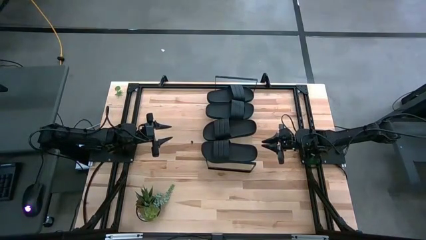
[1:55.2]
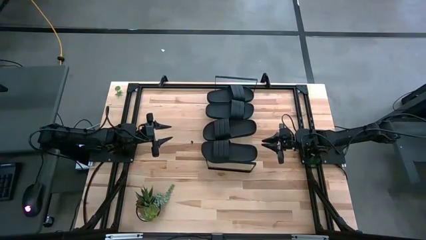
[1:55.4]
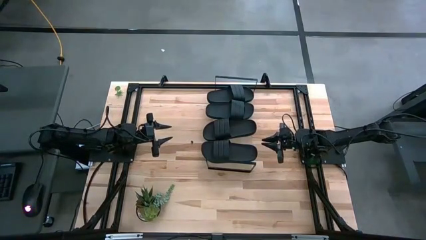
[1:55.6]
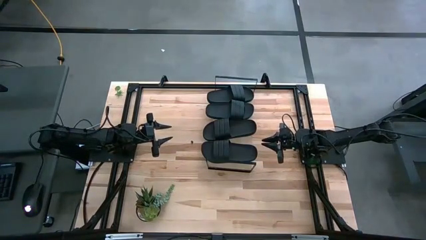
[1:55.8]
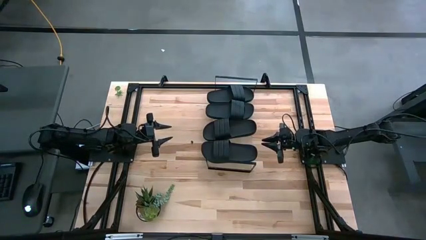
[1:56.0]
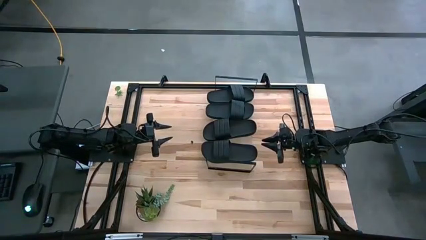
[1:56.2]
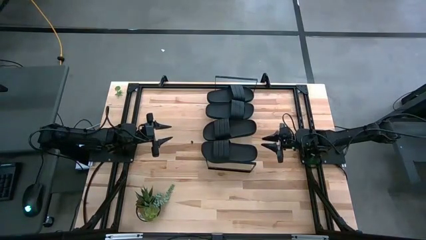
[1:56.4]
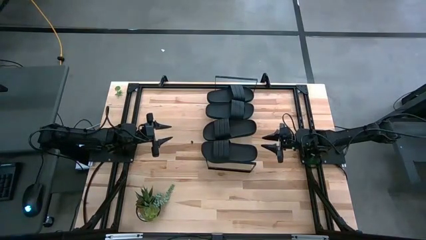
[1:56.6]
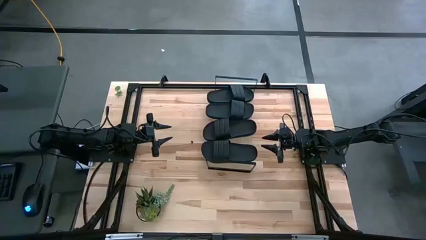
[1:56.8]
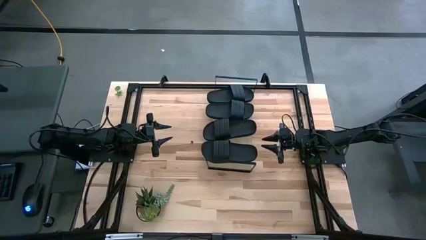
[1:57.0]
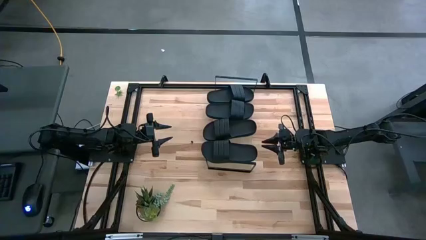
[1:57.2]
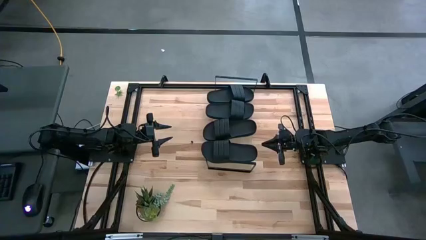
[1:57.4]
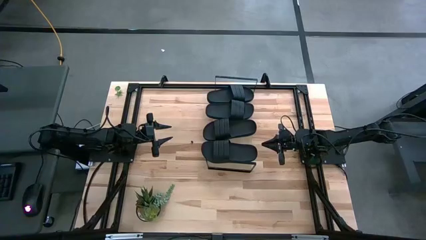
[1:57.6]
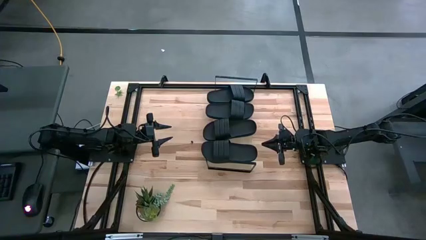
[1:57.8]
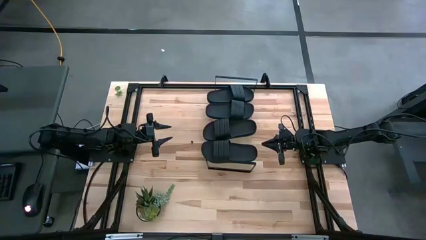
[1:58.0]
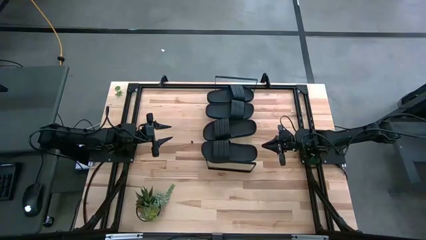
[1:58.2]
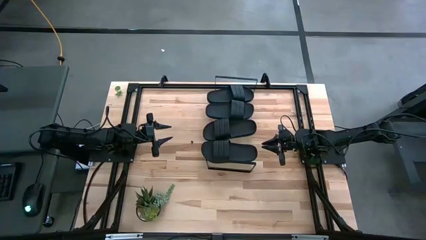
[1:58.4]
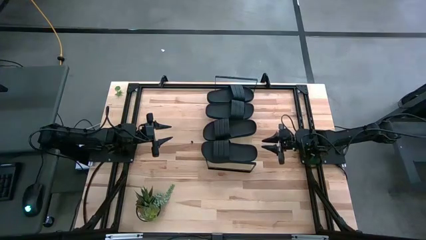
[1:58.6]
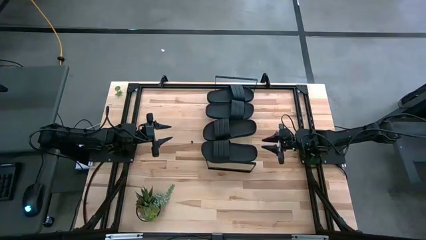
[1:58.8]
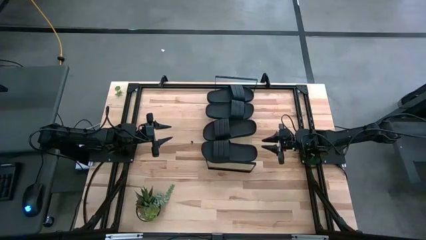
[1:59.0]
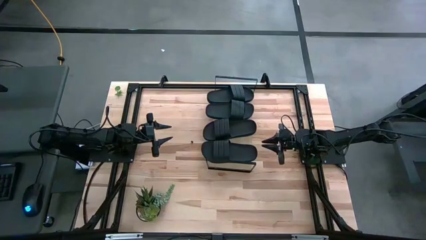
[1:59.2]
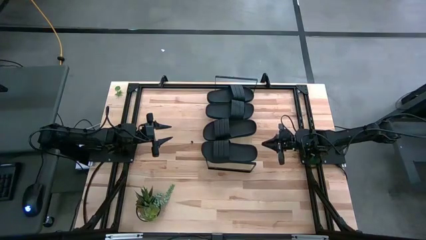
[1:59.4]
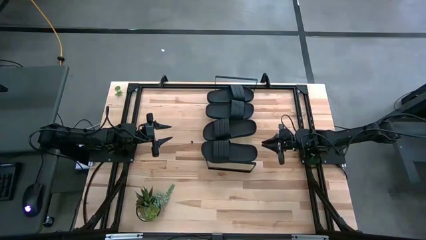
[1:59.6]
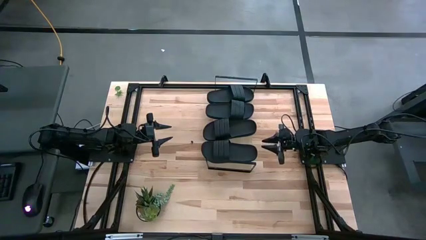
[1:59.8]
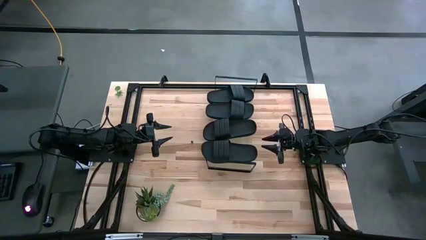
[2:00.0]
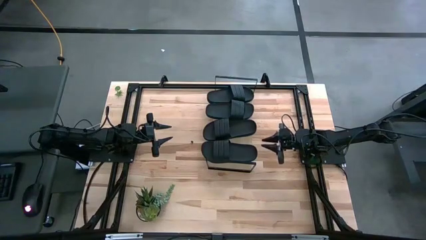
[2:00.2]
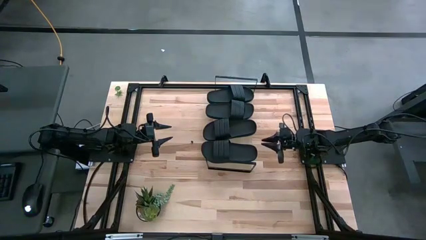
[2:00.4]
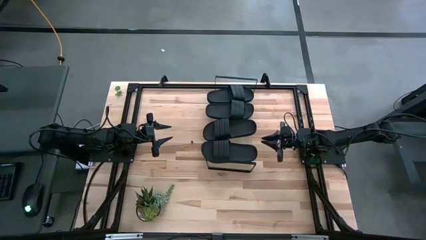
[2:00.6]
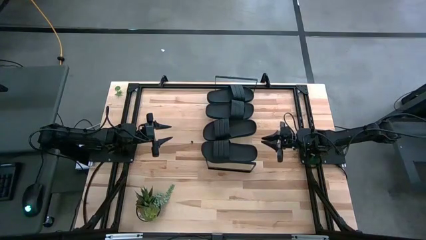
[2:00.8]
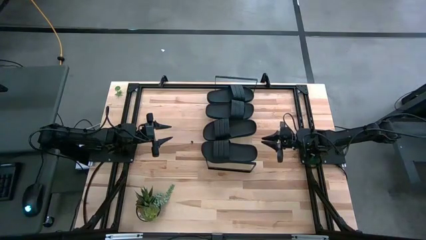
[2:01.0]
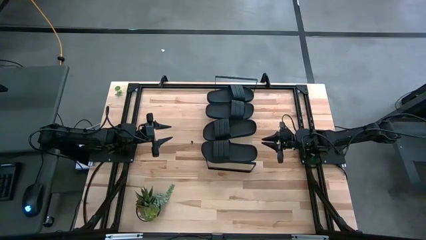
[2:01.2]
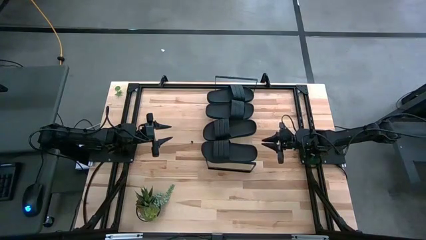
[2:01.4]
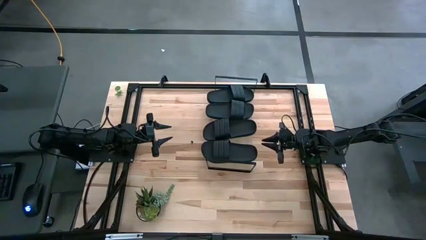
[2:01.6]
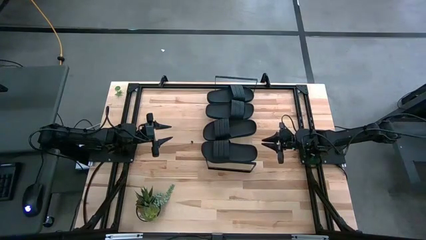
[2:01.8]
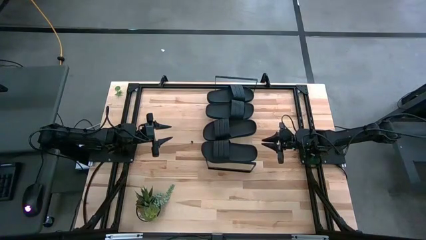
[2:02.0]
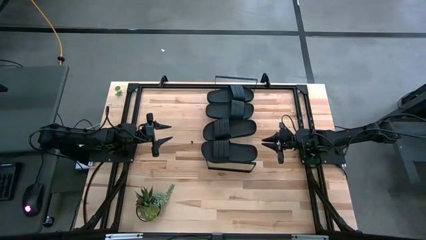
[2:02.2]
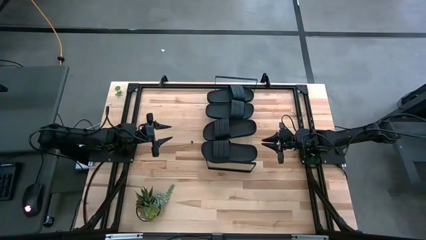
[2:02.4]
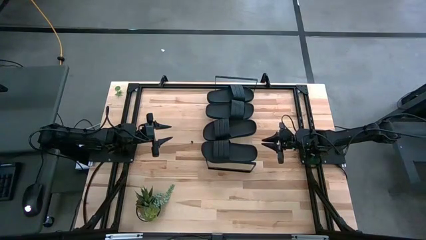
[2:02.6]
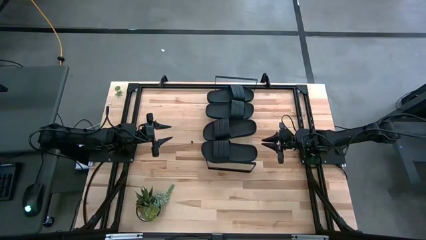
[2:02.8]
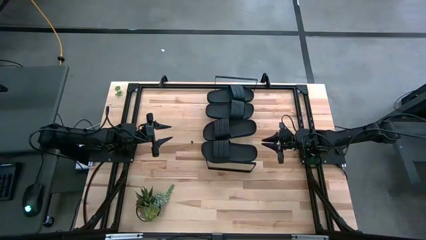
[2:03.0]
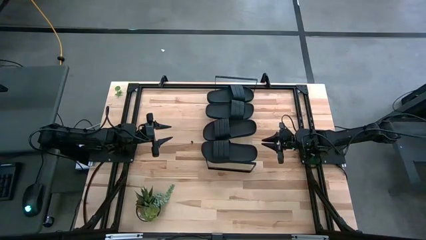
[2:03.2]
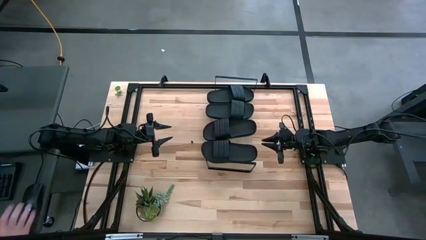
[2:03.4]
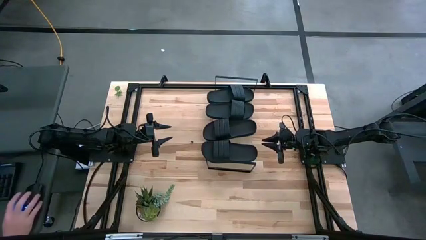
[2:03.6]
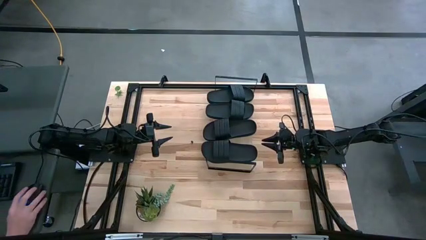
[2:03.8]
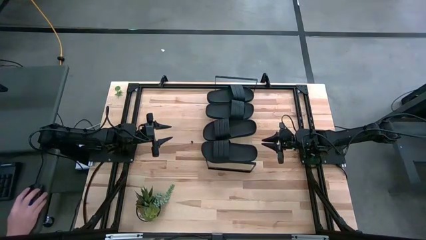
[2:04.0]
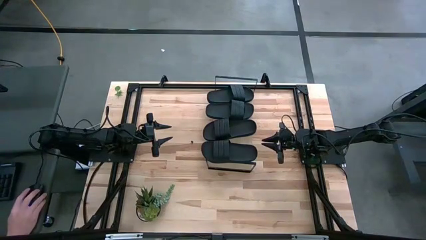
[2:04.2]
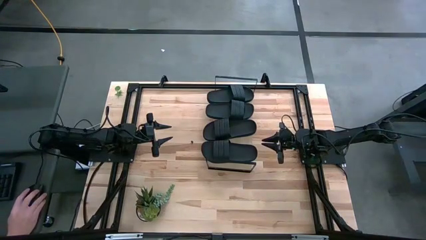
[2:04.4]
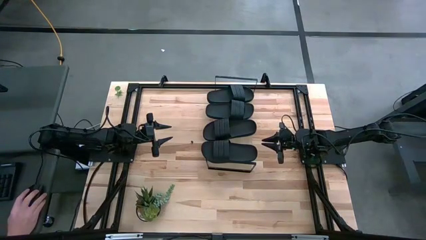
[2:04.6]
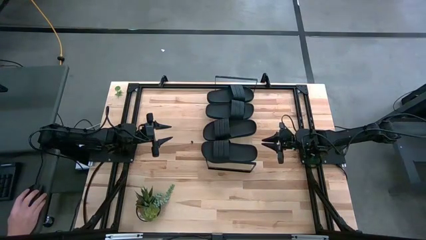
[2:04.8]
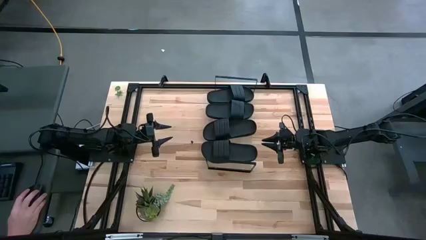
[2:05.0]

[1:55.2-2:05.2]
Task: Pick and place slides into the shelf
Return to Home Position

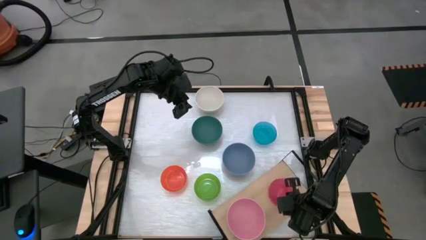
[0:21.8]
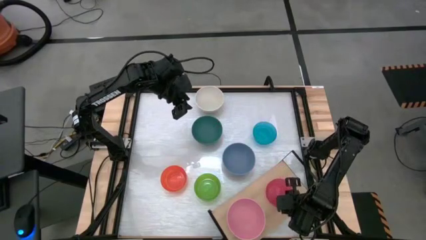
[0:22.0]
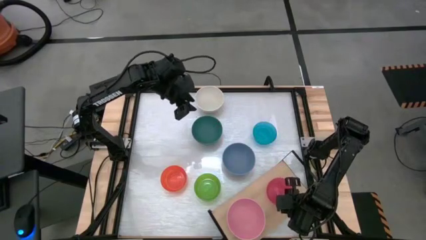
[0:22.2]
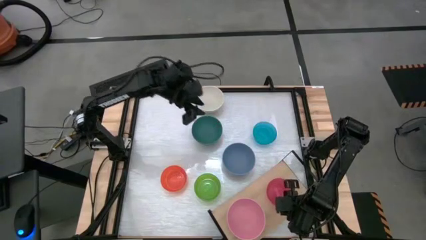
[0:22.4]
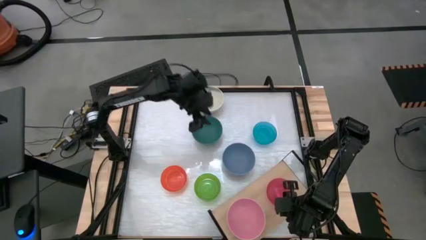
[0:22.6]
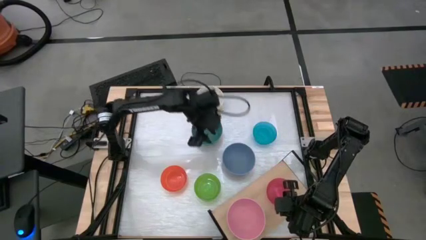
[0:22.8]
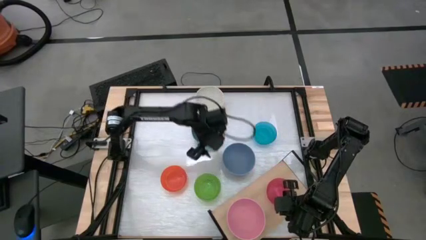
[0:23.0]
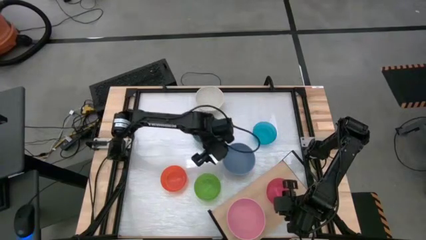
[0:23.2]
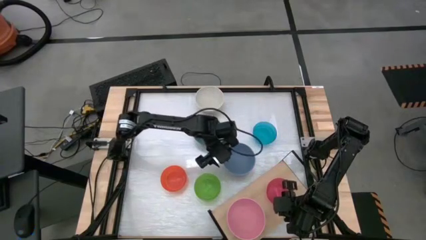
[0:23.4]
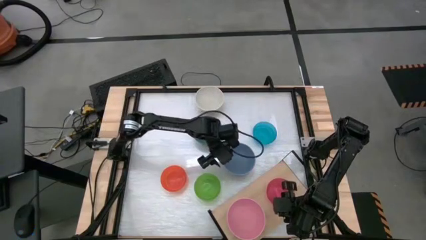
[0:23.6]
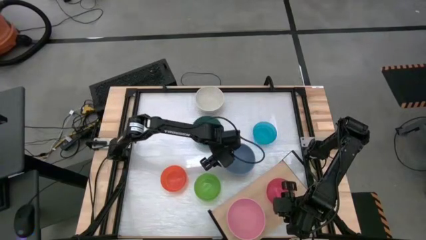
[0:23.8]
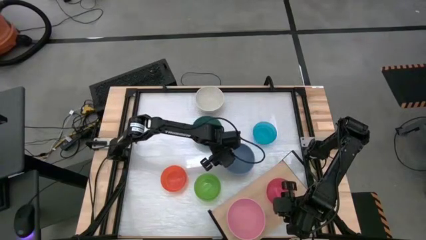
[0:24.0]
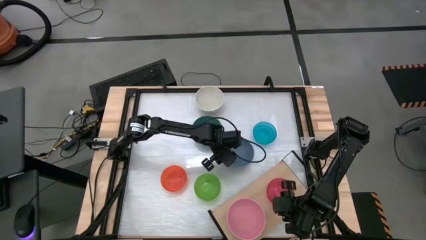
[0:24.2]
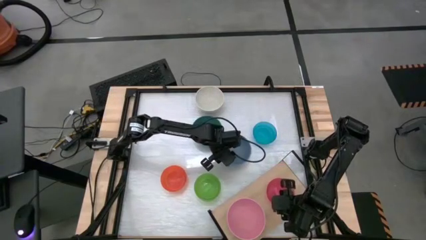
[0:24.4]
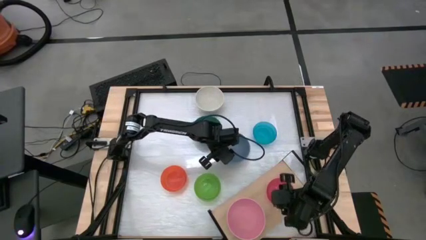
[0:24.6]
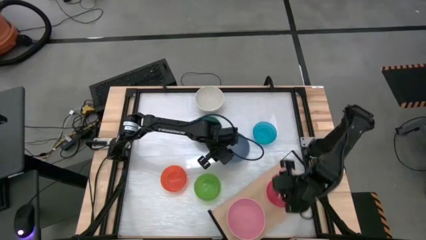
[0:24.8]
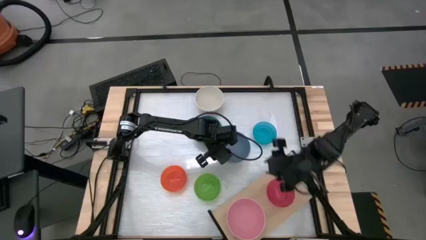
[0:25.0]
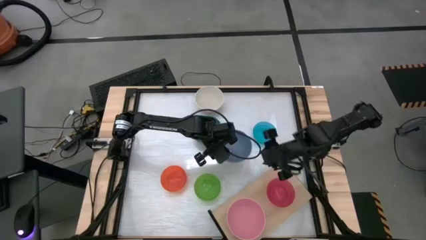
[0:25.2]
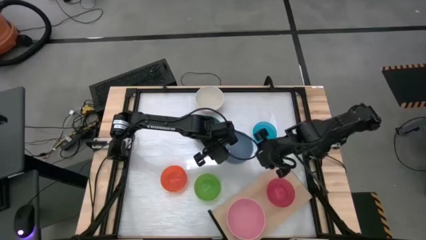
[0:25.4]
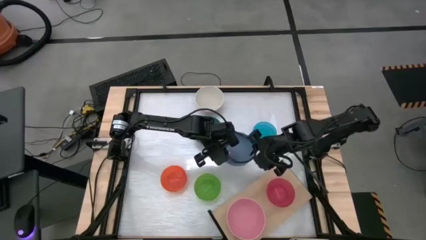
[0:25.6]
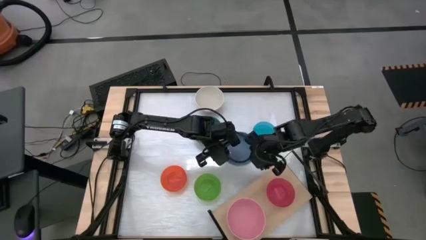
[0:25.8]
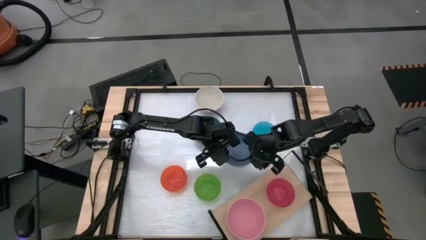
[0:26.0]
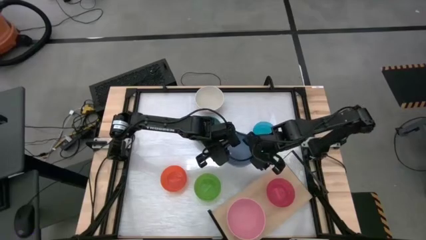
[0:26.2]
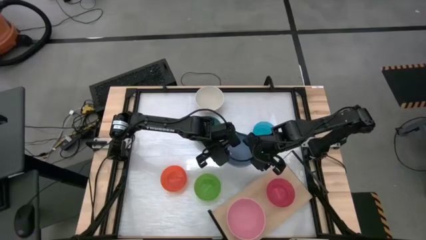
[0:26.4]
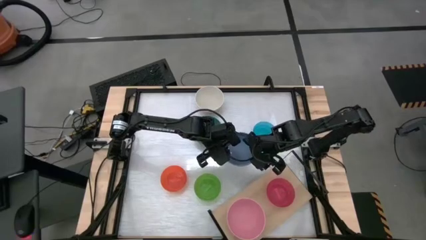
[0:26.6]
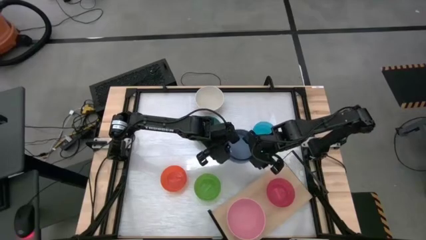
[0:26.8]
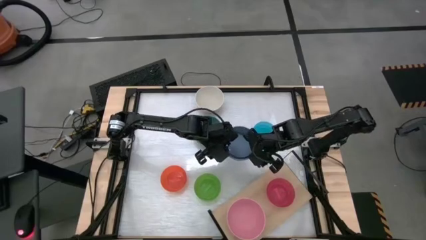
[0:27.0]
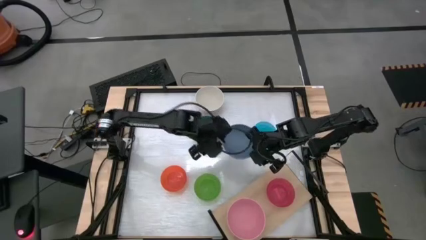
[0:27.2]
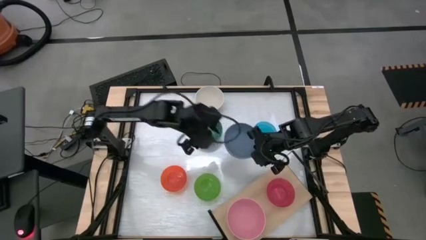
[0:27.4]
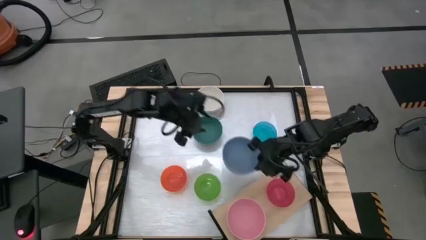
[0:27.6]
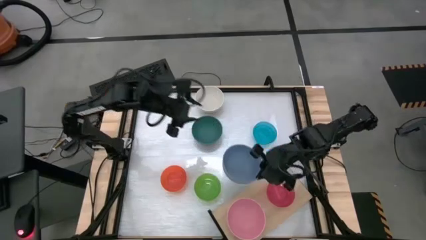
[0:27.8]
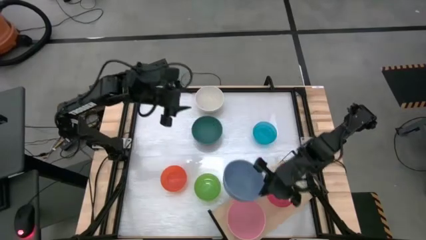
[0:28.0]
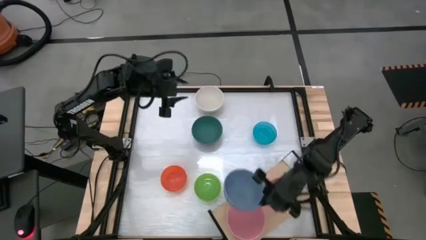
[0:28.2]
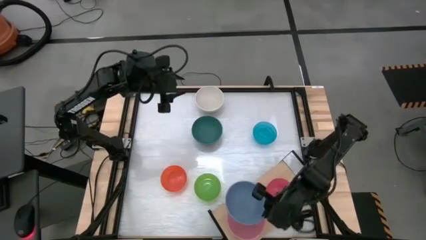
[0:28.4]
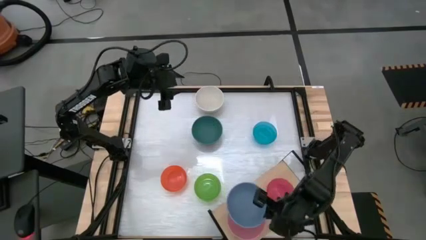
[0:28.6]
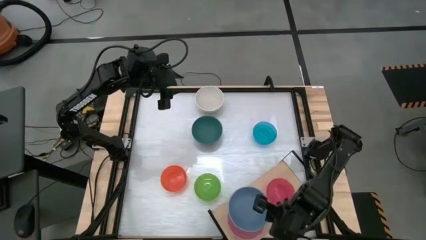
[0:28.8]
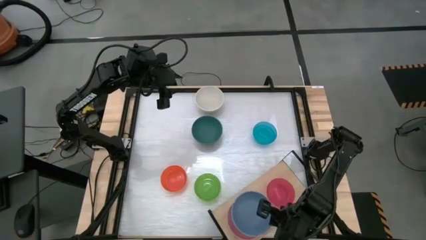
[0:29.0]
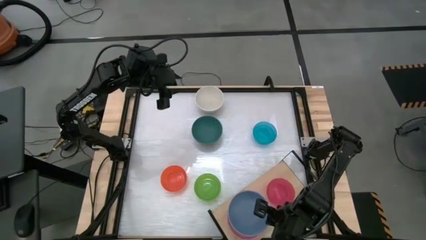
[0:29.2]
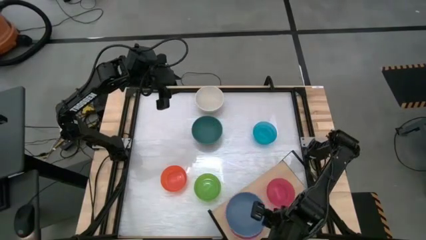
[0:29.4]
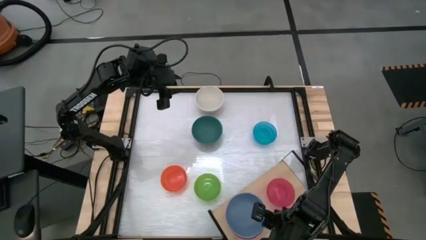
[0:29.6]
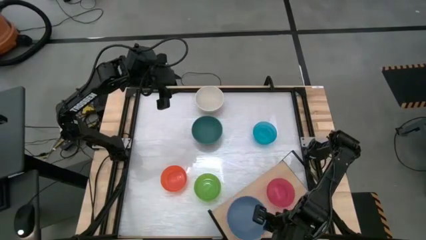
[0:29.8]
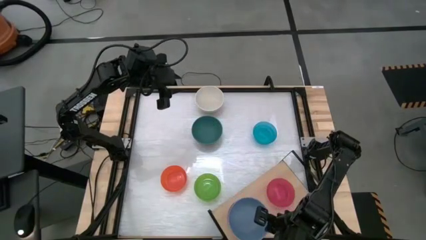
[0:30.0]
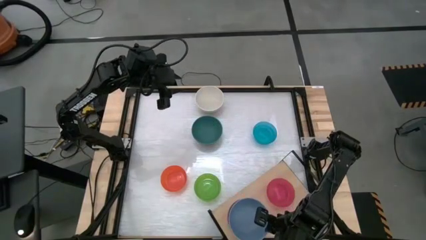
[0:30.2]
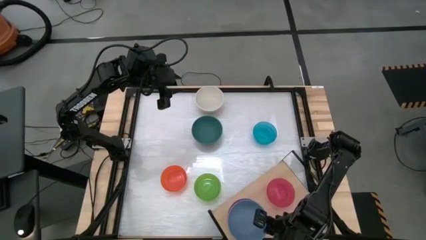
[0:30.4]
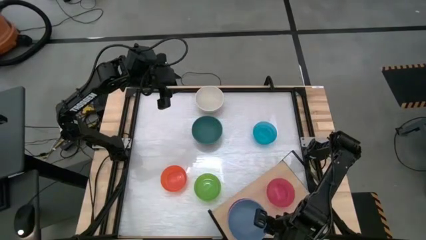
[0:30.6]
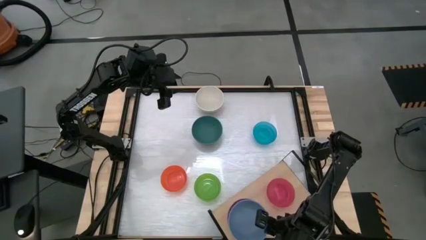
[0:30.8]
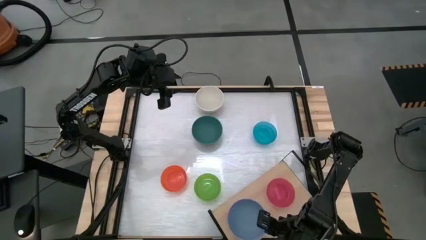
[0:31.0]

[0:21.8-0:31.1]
Task: Place and stack bowls onto a shelf
Stack the light blue bowl on top of the light pink bowl on the shelf
